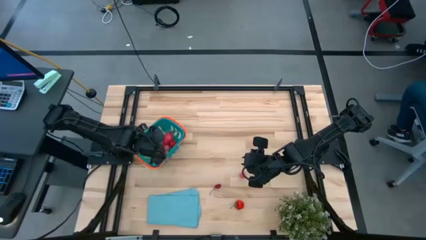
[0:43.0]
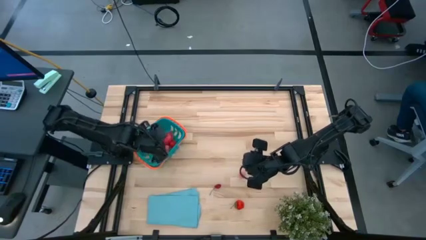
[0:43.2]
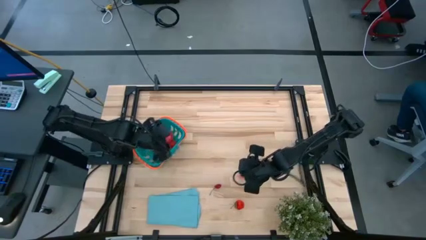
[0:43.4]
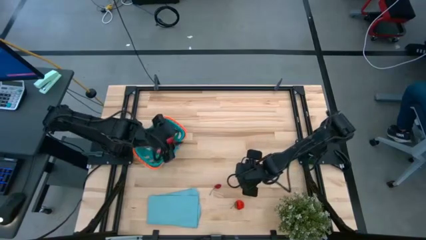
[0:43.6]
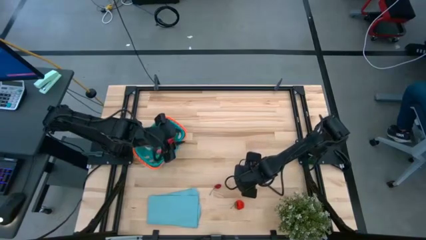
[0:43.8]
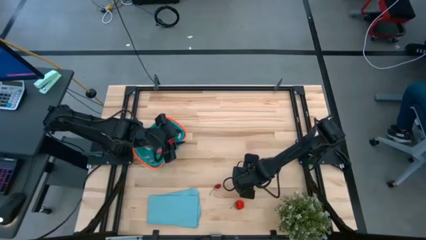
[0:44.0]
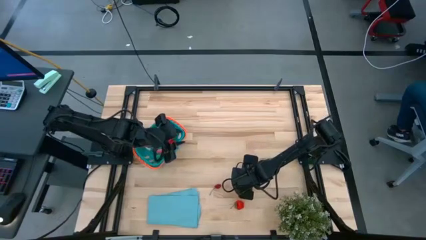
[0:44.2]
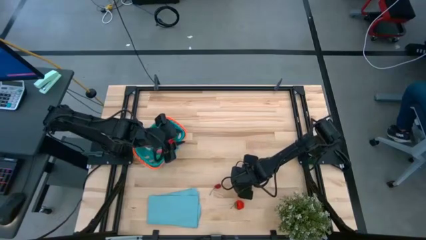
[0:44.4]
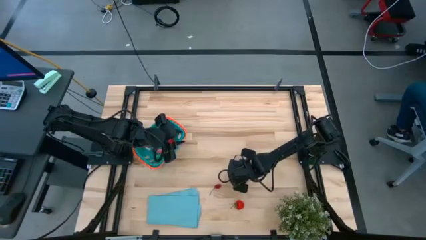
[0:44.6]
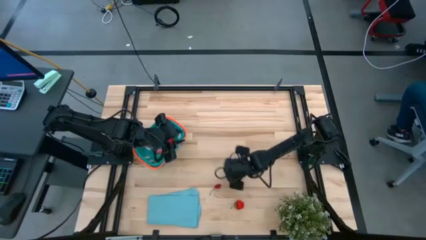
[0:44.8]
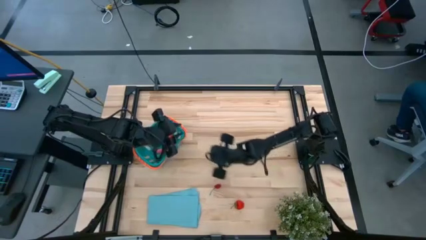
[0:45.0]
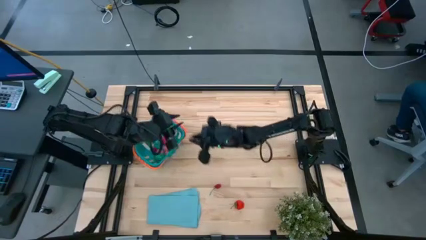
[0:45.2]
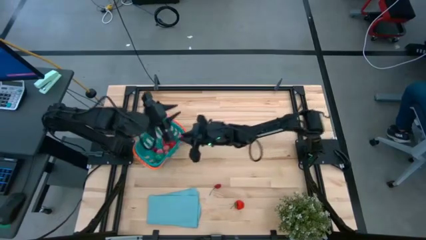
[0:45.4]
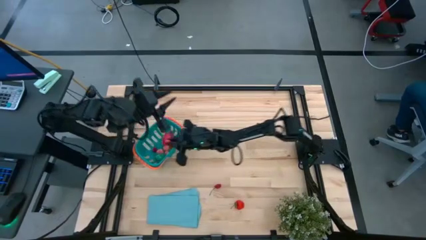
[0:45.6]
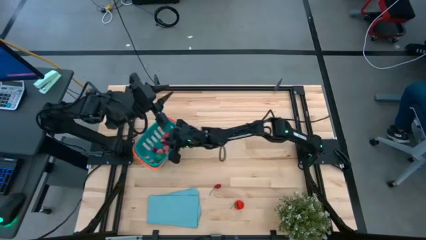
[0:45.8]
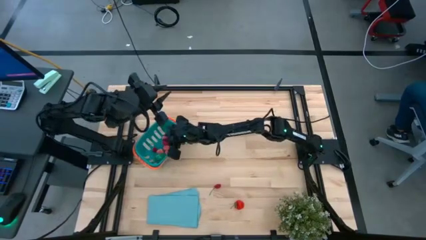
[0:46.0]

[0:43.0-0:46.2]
Task: Pick and placing Produce into tupperware
Put the pink apricot into the blue basket

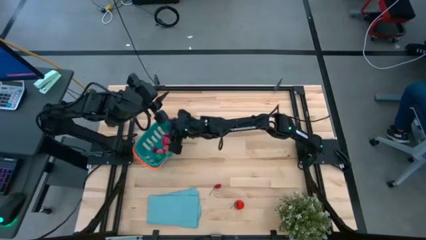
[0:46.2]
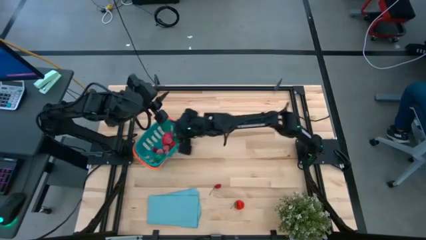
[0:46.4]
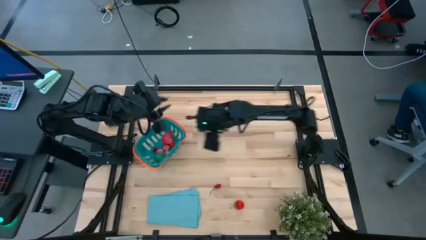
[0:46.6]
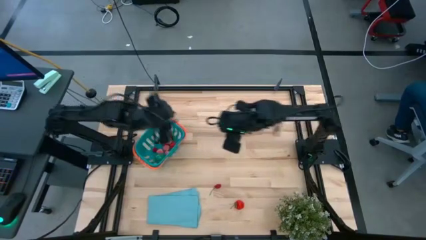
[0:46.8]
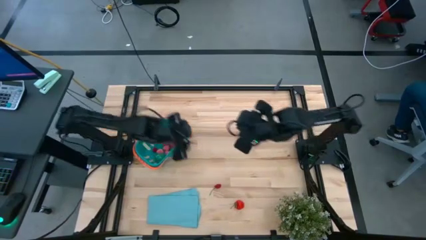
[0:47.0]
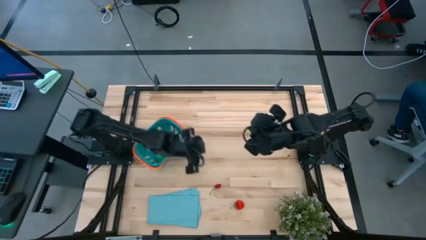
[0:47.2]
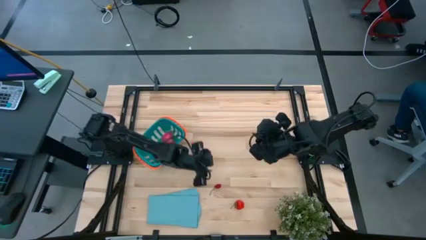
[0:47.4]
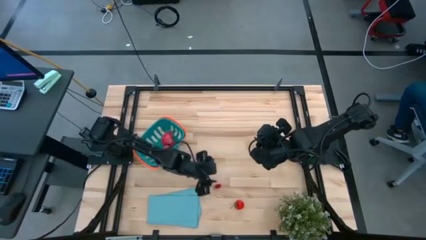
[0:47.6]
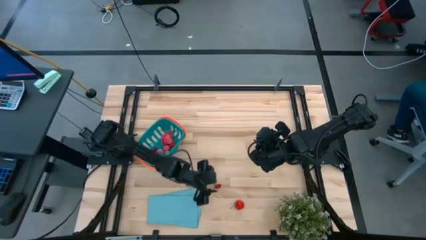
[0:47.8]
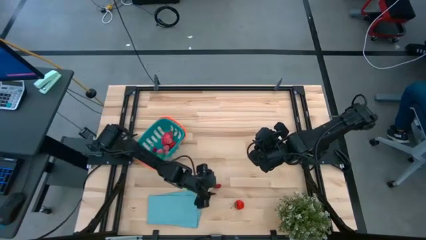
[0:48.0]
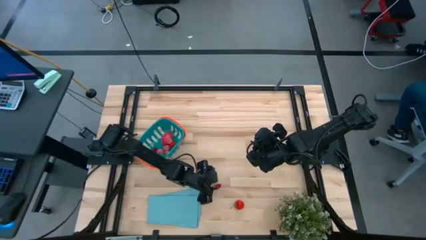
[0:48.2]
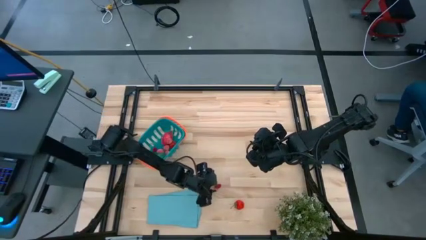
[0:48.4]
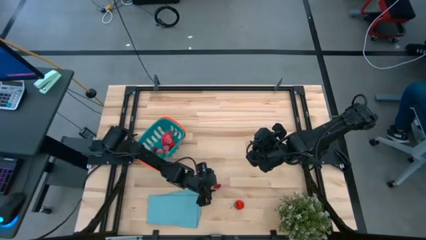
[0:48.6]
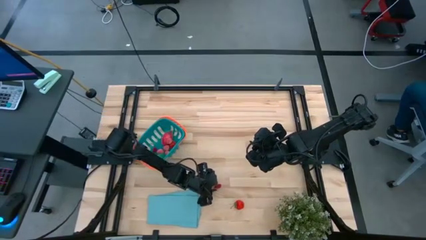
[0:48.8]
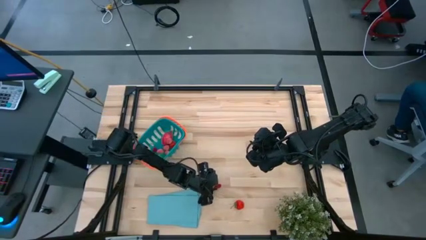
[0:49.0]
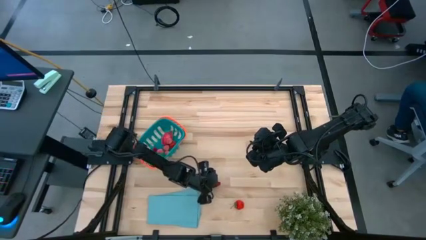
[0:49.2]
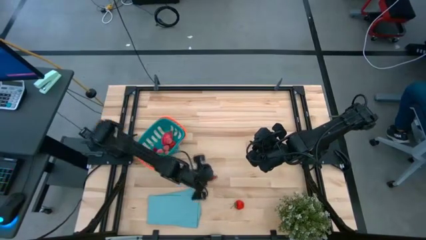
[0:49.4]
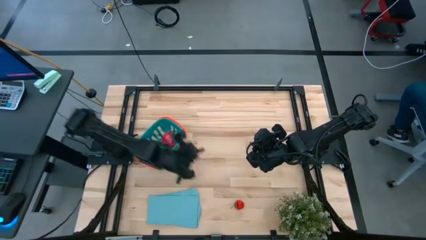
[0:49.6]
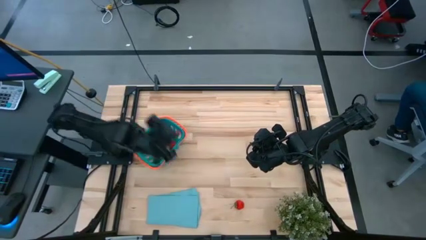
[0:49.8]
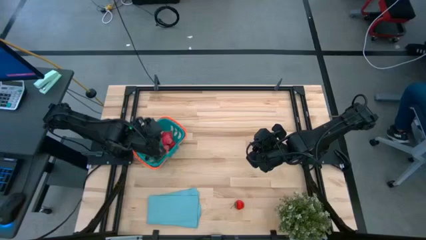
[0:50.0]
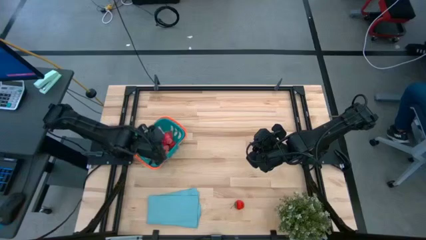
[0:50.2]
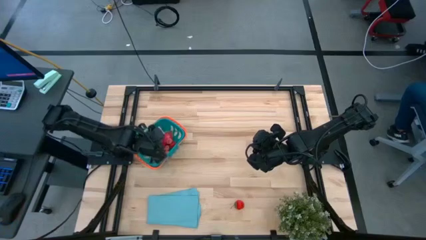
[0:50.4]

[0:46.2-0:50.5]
Put the red cherry into the blue basket

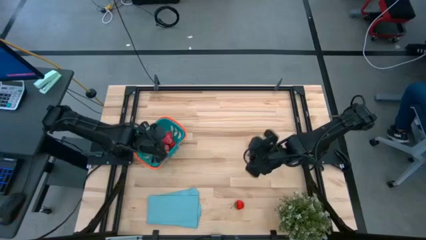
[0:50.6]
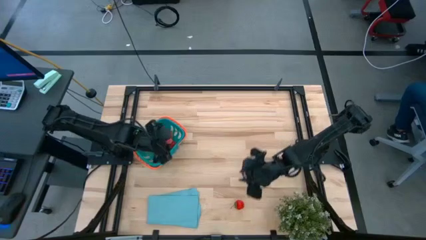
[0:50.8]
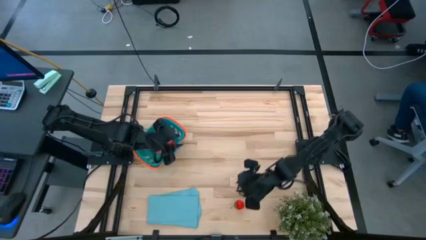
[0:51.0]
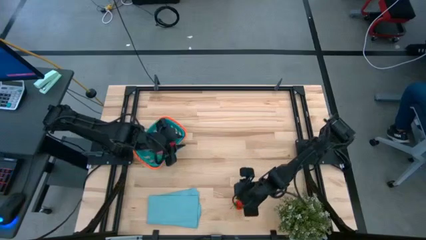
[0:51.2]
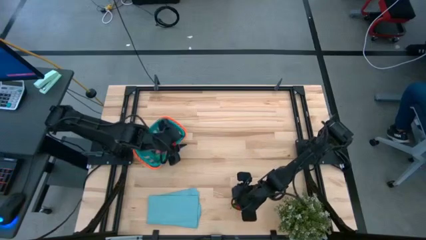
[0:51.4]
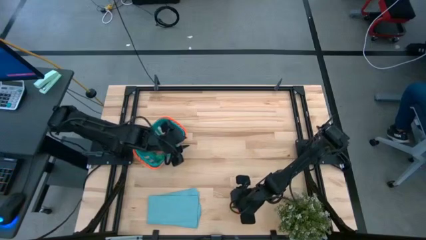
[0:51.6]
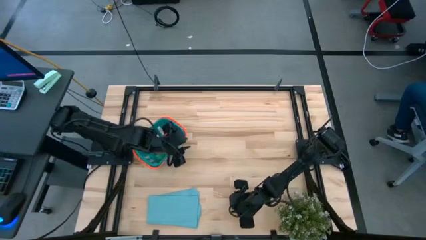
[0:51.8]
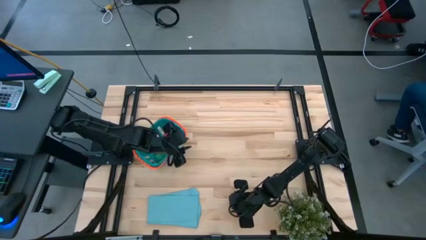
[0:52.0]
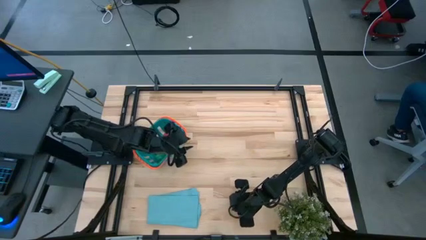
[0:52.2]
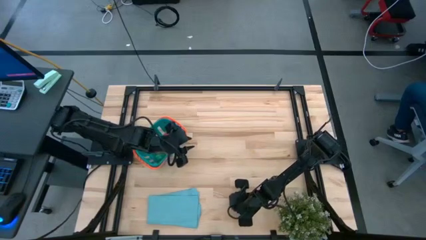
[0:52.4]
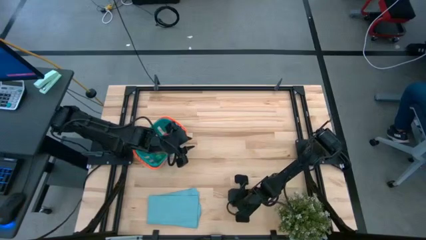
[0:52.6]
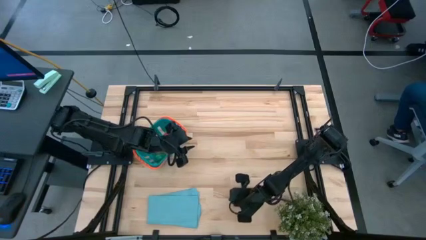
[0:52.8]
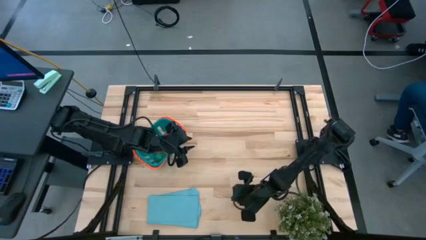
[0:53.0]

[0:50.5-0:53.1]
Put the red strawberry into the blue basket

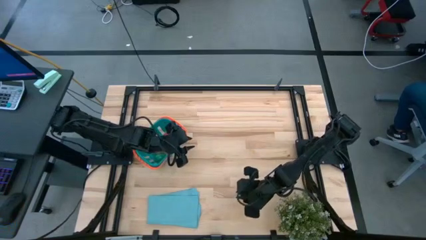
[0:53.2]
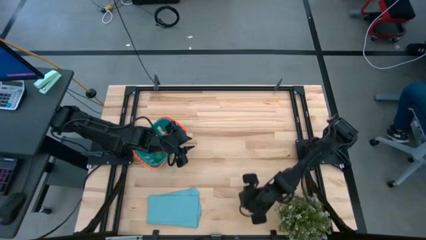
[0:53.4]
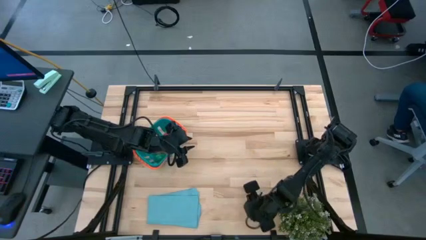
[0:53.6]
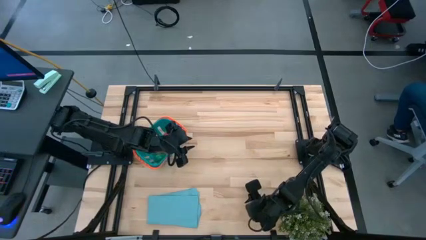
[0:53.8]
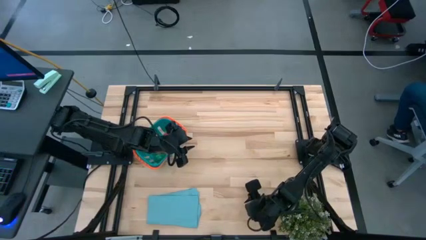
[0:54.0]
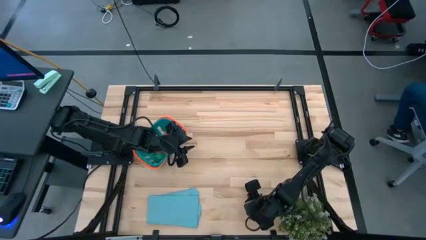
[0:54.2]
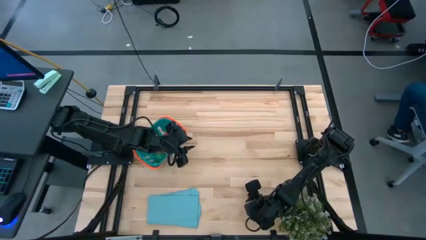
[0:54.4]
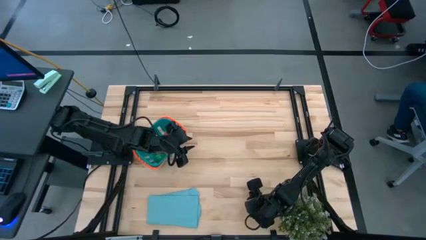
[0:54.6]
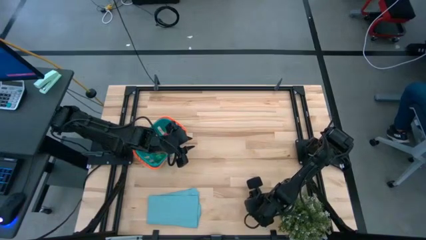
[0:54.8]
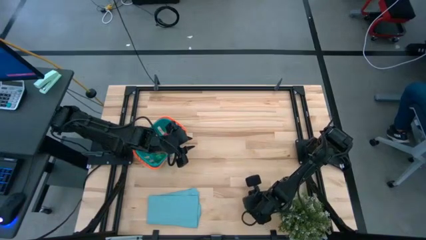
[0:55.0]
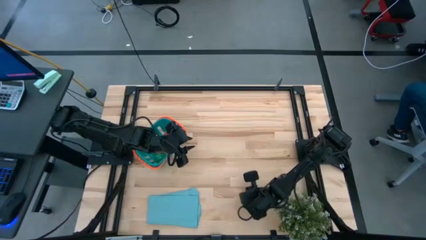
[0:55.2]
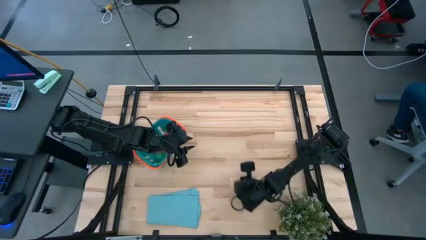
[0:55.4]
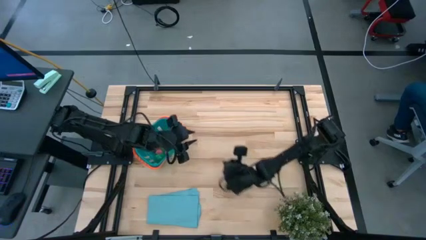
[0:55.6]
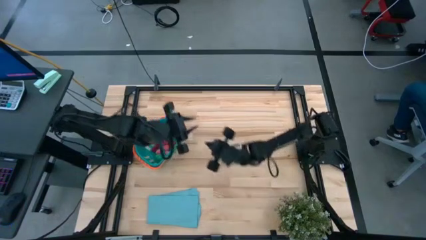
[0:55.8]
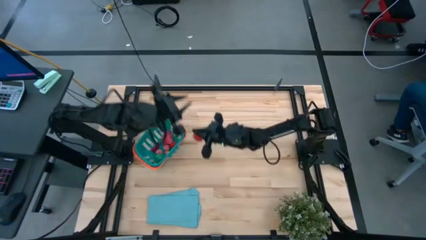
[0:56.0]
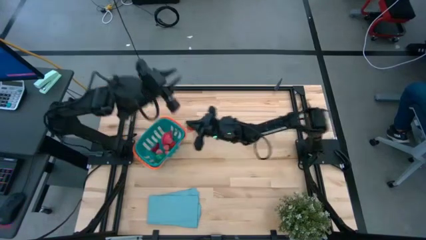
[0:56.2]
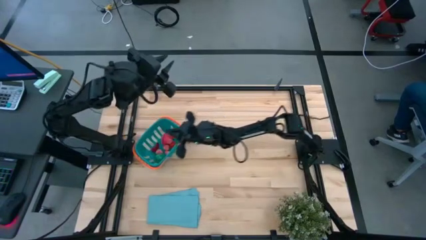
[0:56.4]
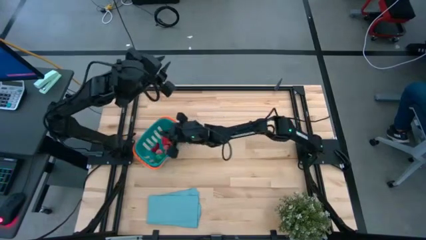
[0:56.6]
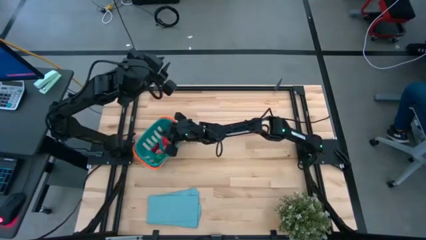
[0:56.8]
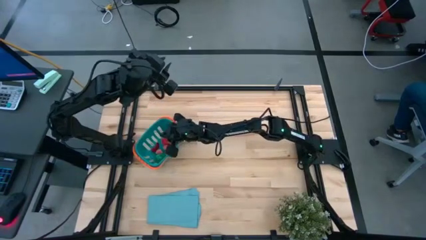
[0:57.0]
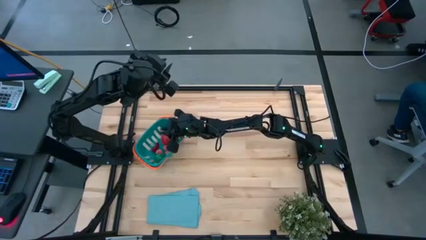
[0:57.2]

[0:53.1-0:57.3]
Put the red strawberry into the blue basket

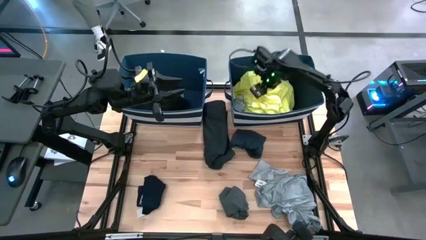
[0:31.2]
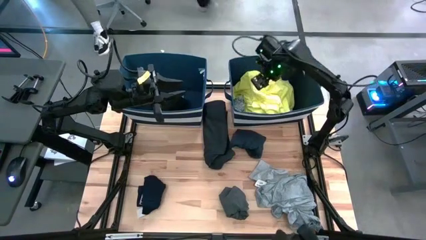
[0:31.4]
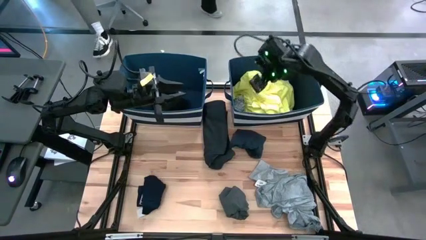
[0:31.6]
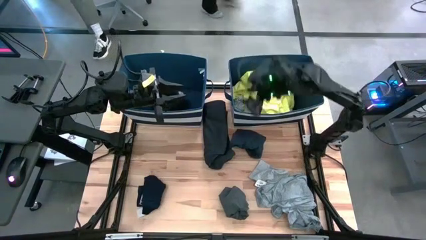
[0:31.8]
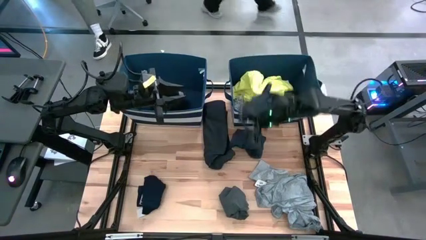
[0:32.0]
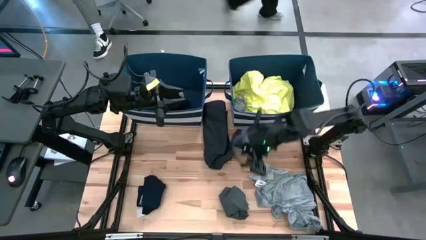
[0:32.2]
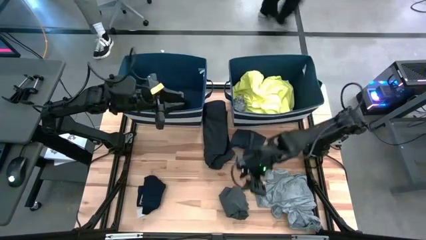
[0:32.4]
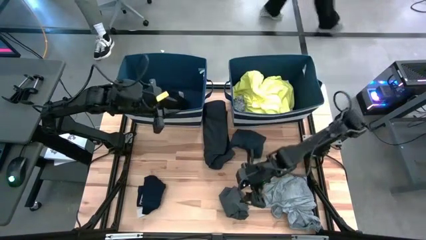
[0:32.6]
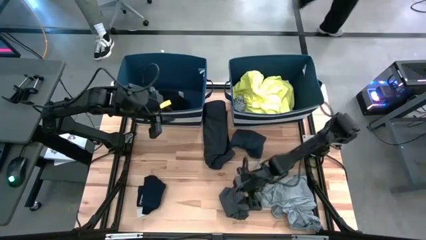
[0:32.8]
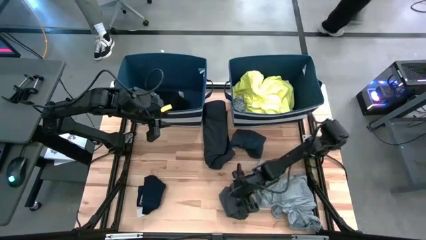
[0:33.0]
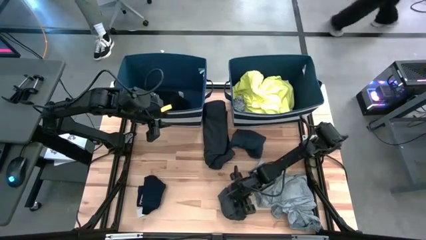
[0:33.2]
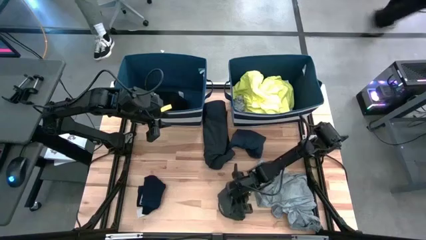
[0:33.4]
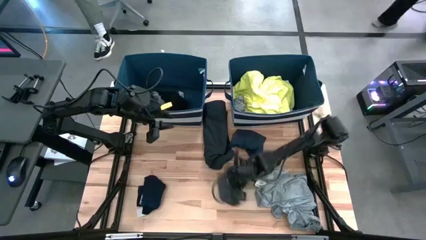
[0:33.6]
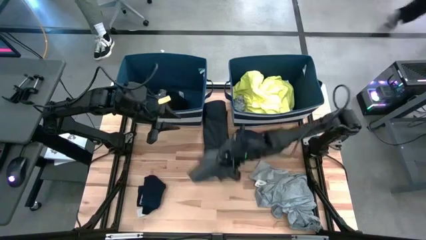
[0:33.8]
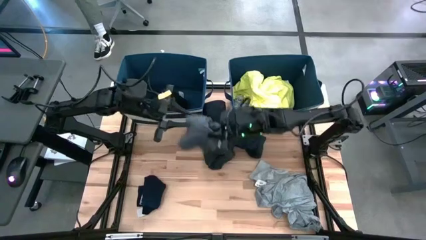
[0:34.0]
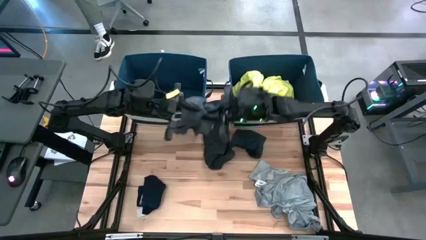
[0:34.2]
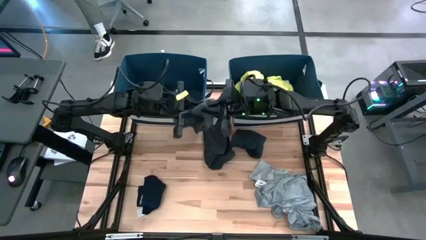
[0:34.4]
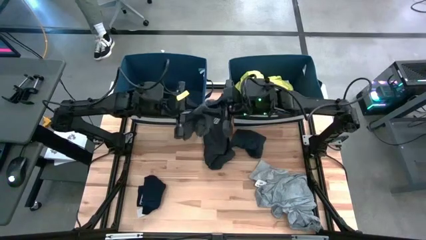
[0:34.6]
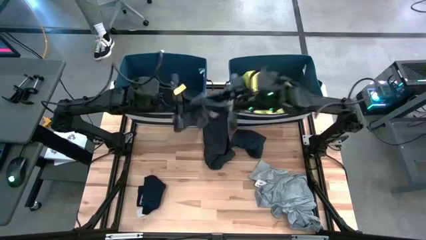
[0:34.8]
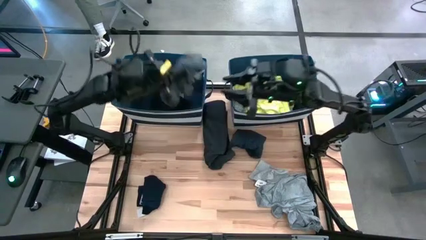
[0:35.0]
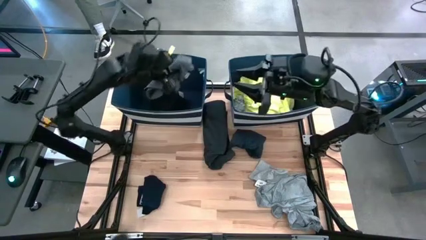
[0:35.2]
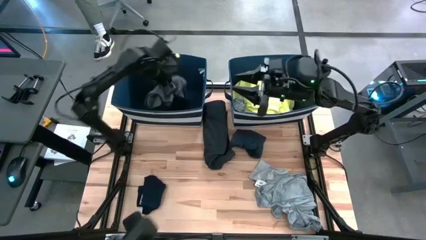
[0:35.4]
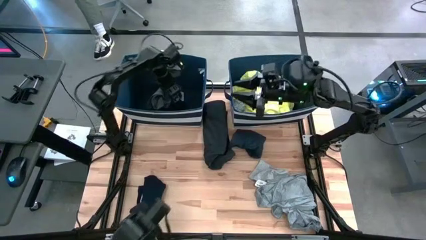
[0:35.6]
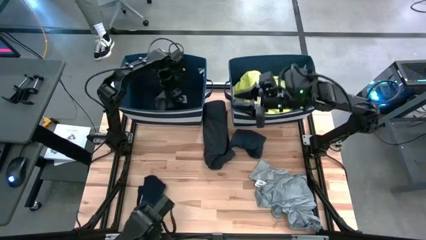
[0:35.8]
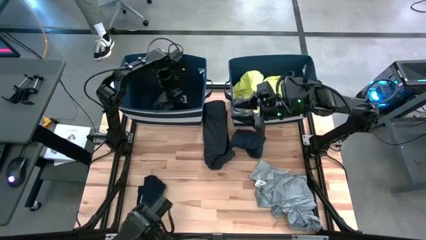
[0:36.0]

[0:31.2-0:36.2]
Task: Sort clothes
Put the gray shirt into the left blue laundry bin
